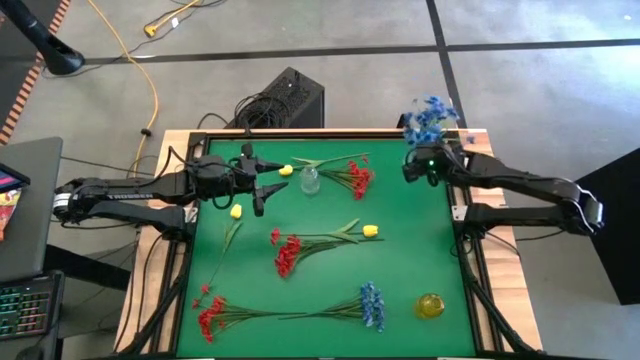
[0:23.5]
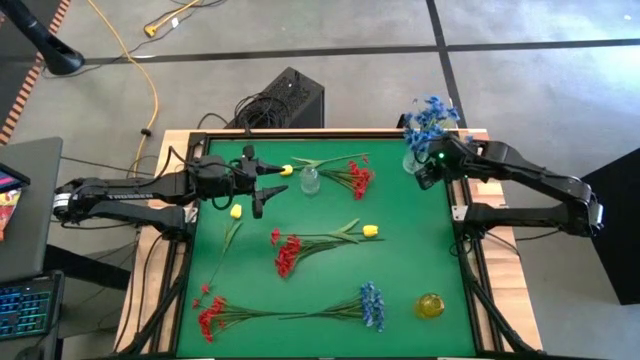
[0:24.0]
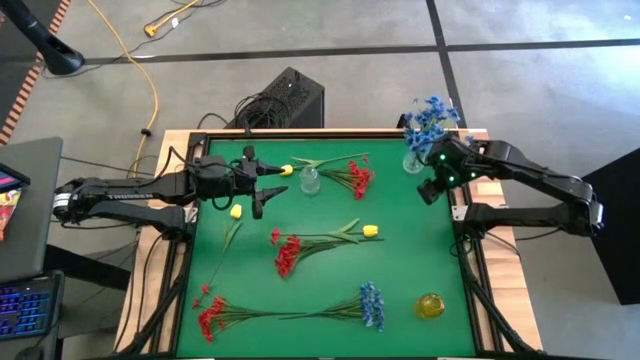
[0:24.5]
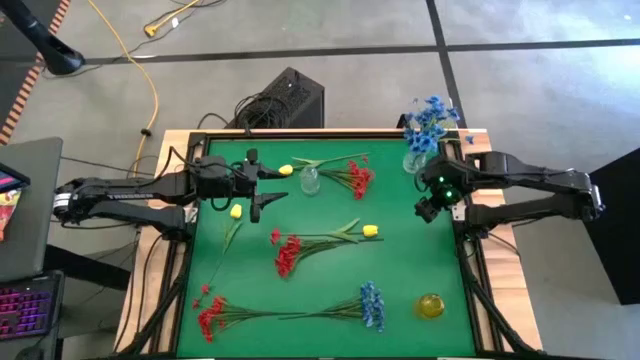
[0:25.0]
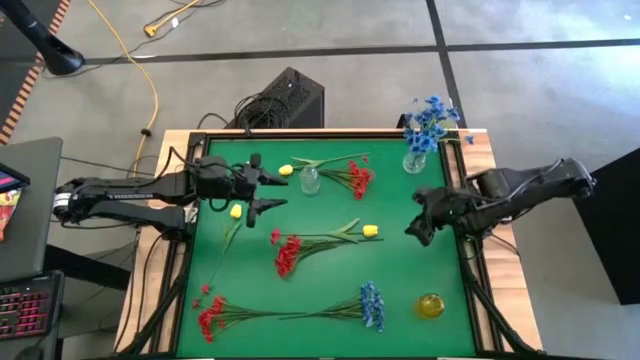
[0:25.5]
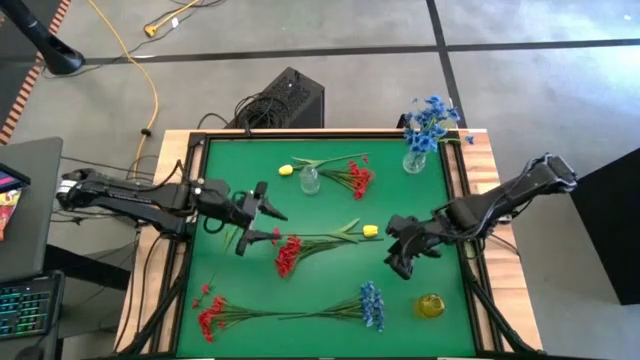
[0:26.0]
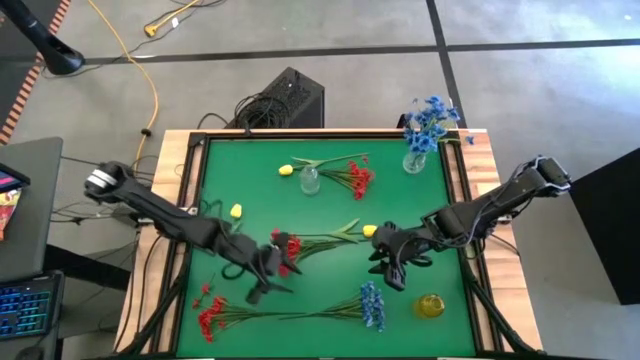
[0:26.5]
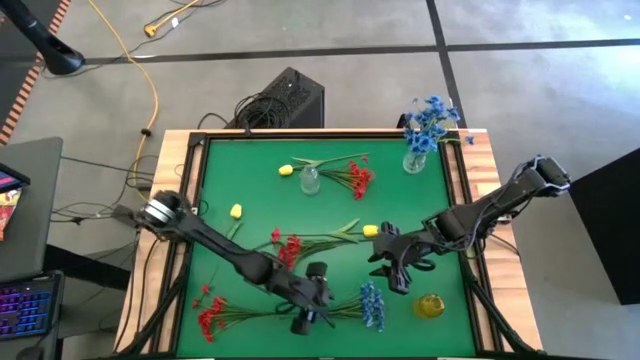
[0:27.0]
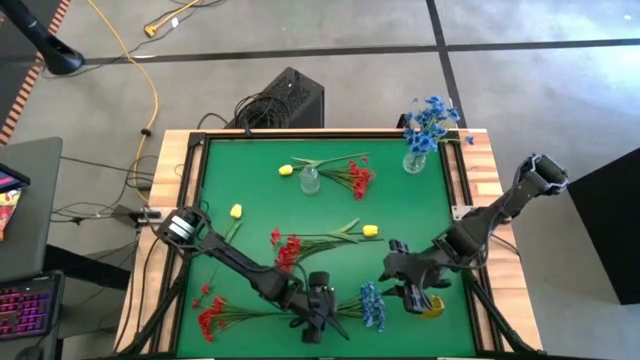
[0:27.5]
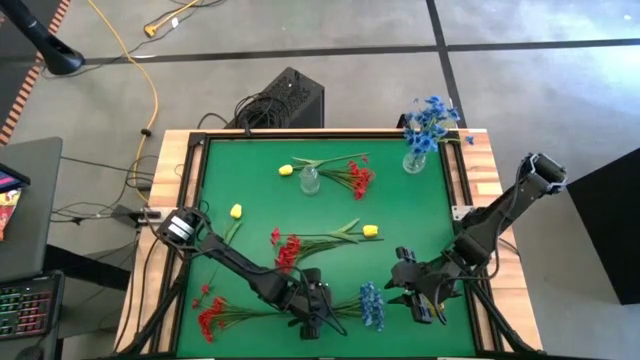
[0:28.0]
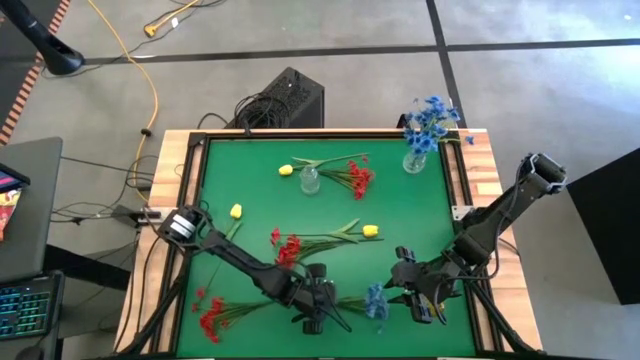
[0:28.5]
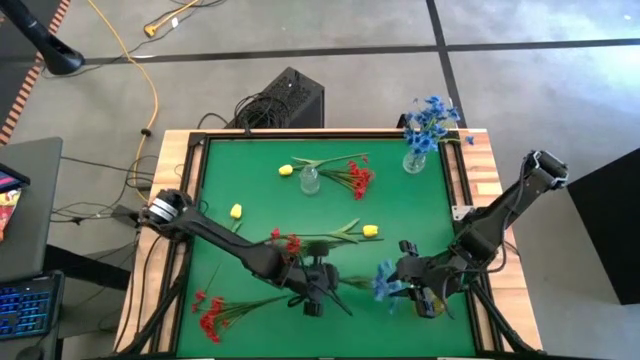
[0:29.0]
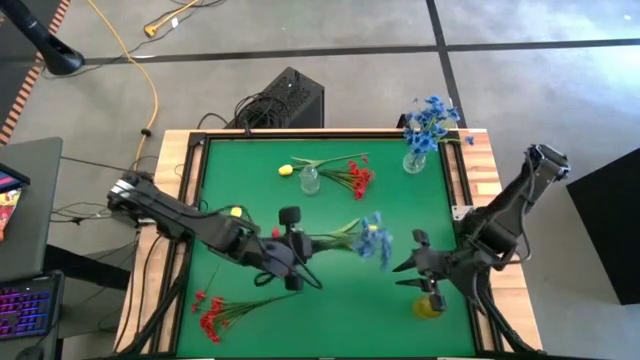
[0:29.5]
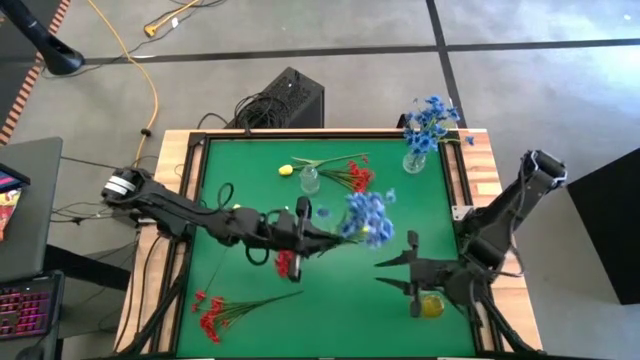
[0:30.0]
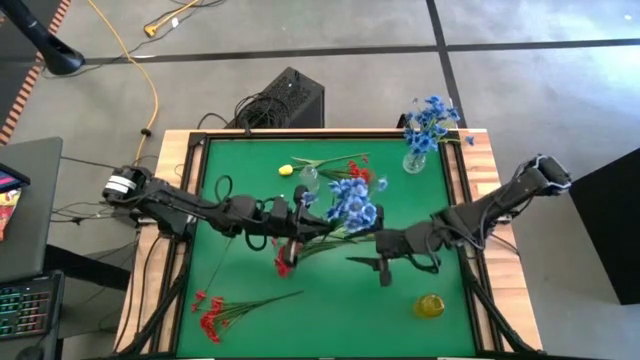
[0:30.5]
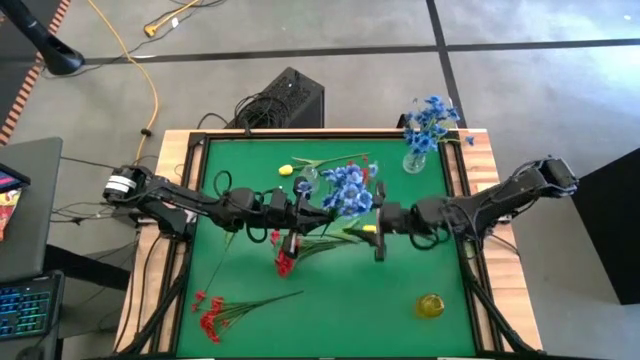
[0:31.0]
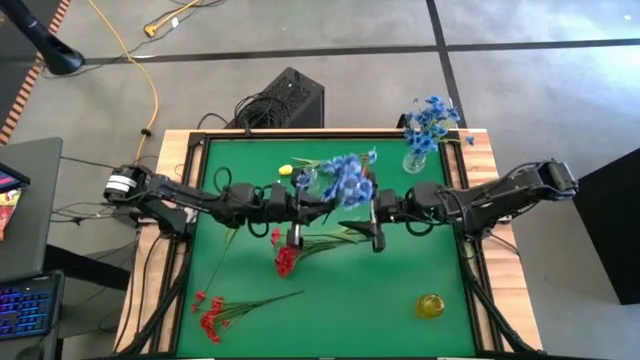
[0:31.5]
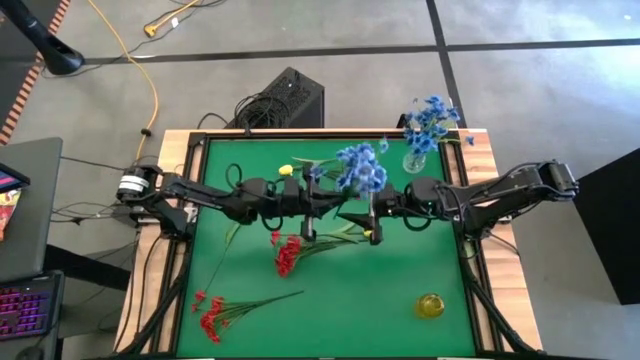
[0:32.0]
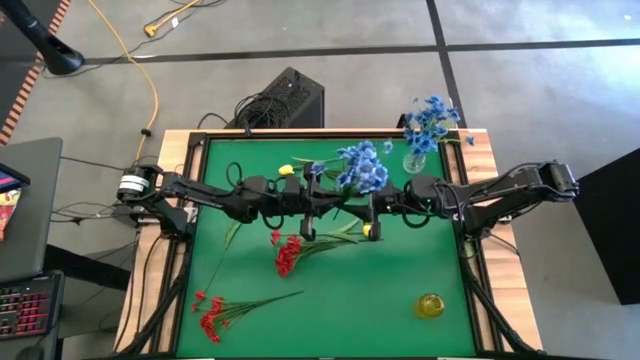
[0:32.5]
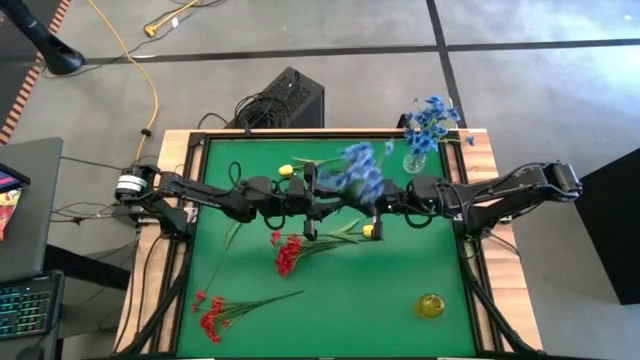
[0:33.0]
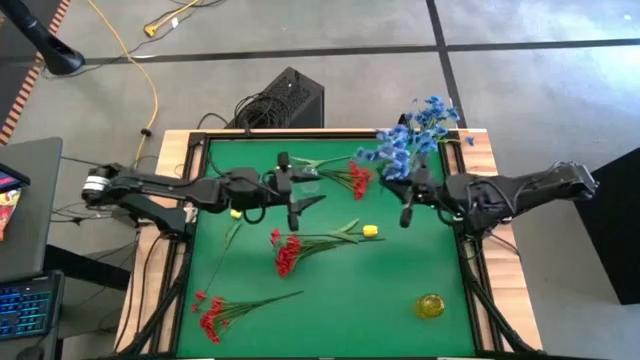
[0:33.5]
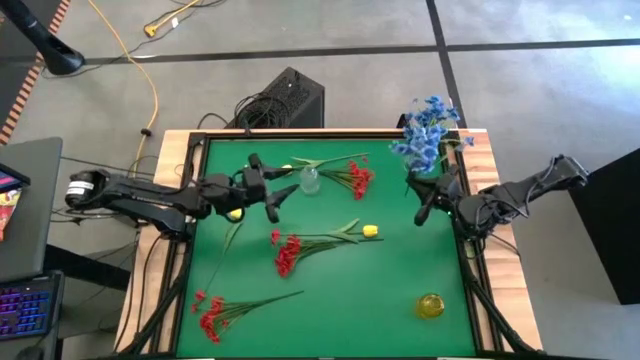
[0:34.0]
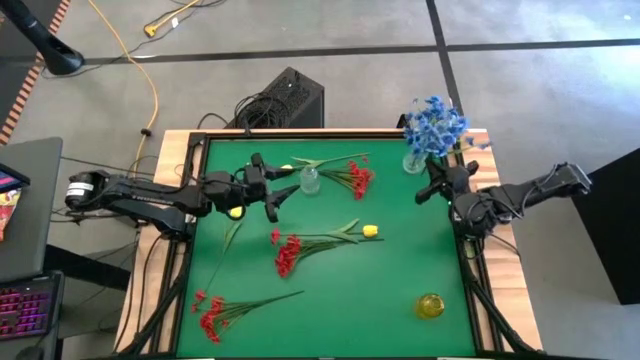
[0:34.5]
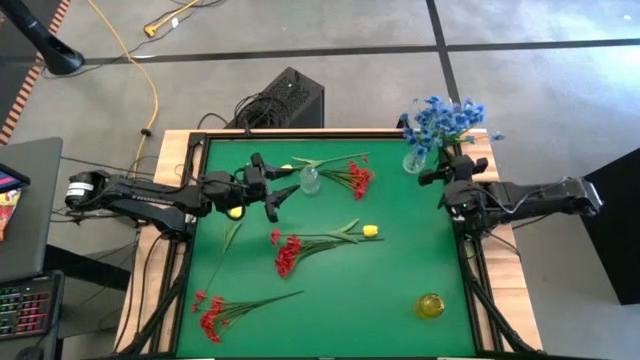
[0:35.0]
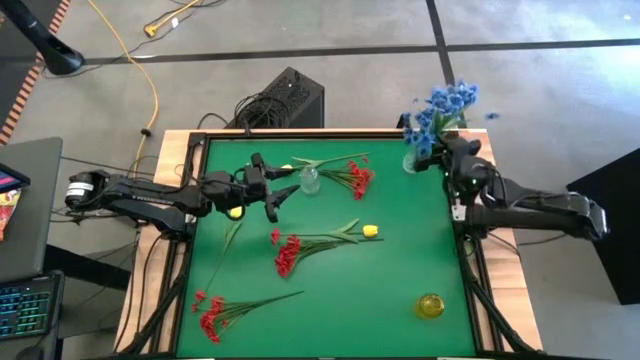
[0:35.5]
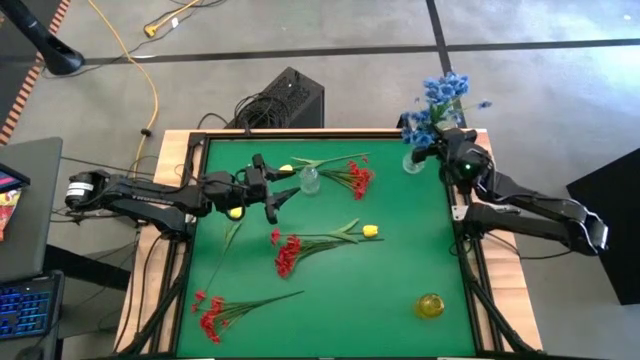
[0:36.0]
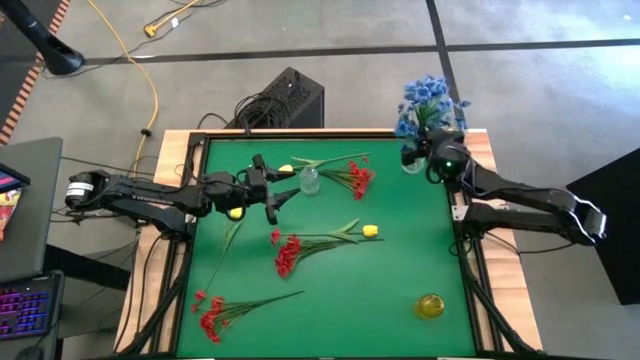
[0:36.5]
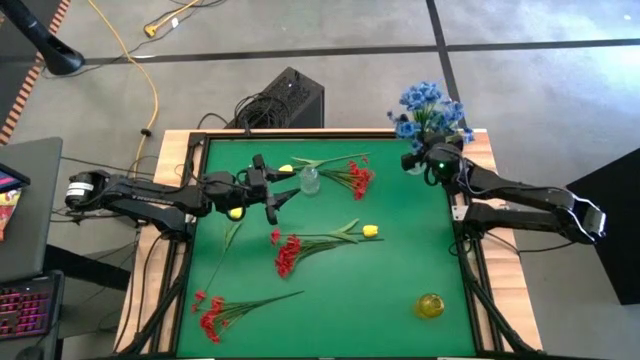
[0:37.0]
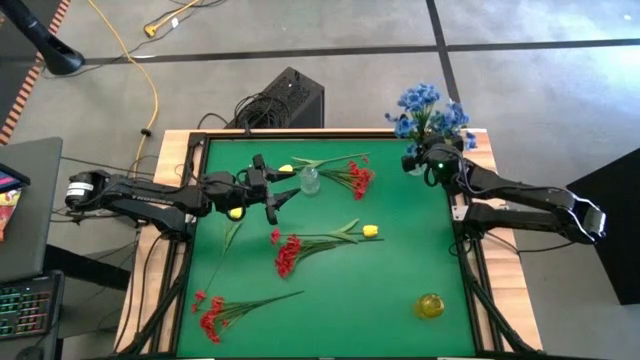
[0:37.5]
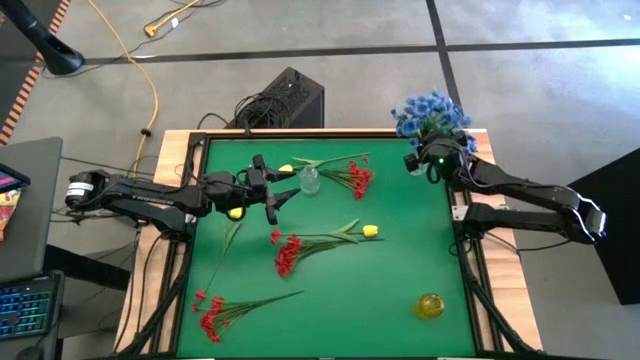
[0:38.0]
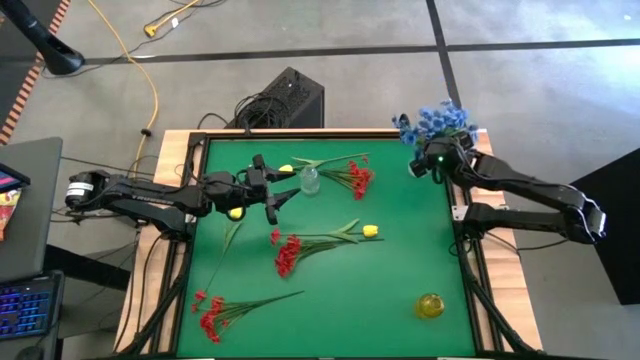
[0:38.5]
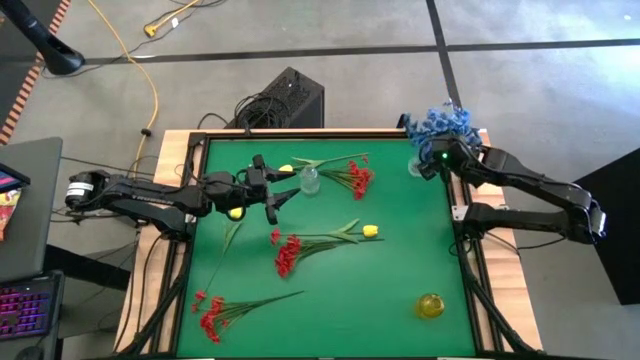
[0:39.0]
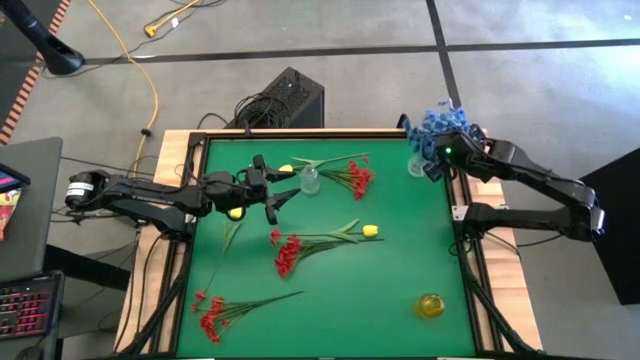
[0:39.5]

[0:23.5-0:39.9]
Task: Sort flowers into vase by color
Put the blue flowers into the right transparent vase

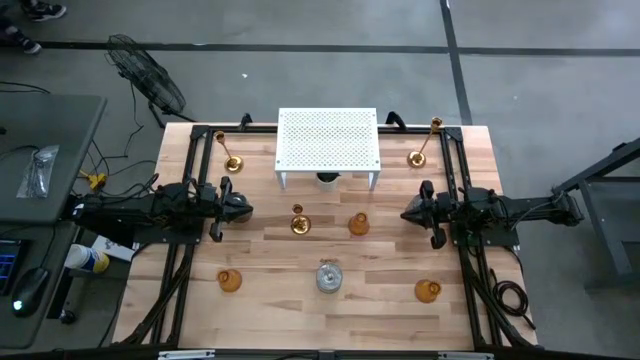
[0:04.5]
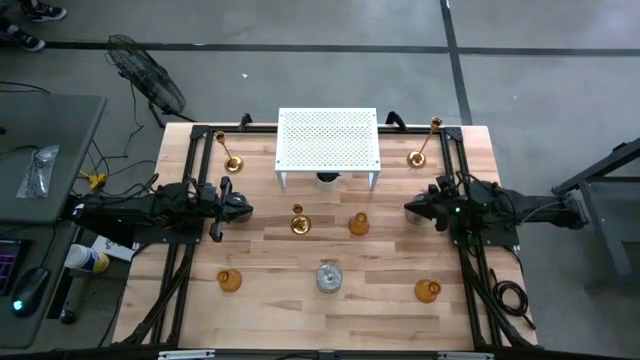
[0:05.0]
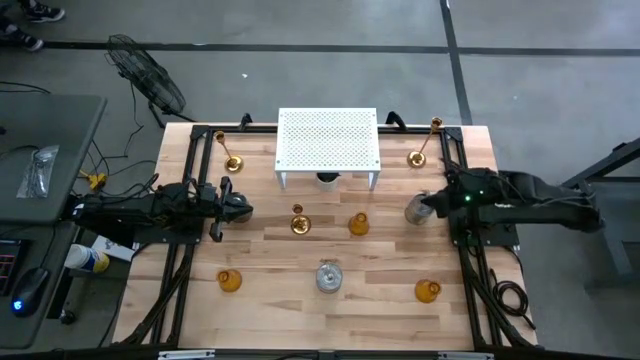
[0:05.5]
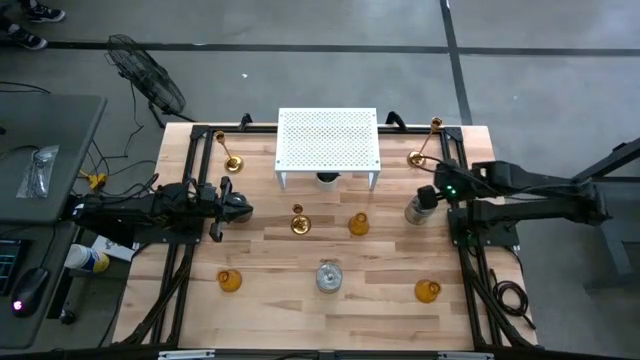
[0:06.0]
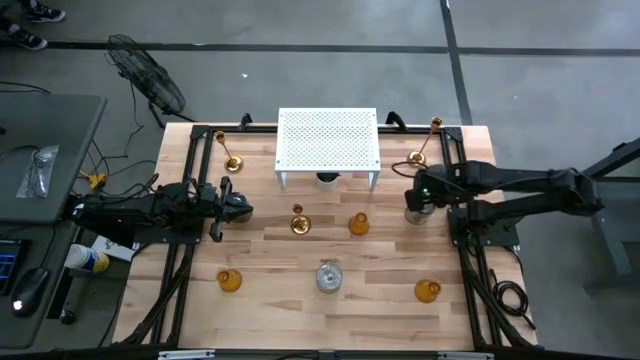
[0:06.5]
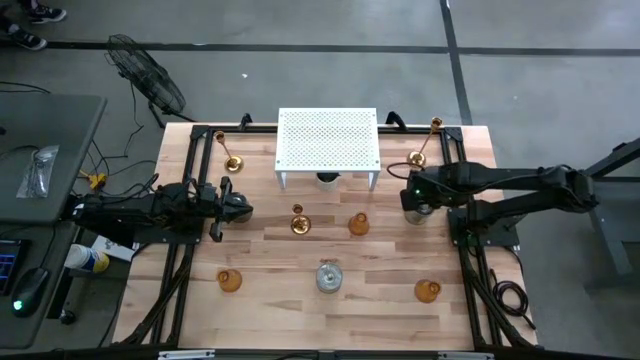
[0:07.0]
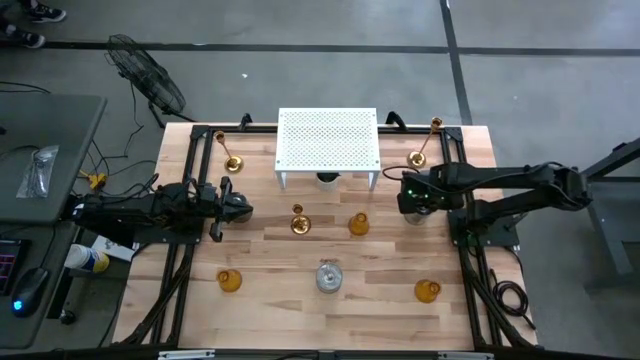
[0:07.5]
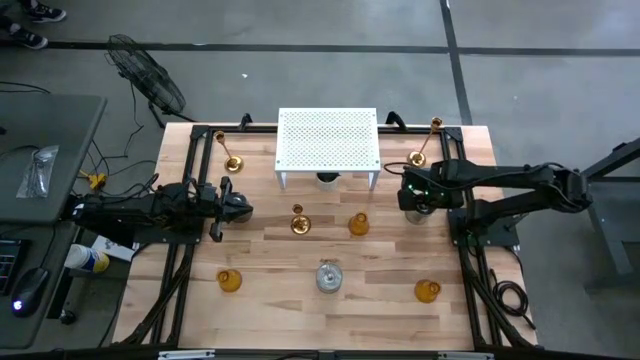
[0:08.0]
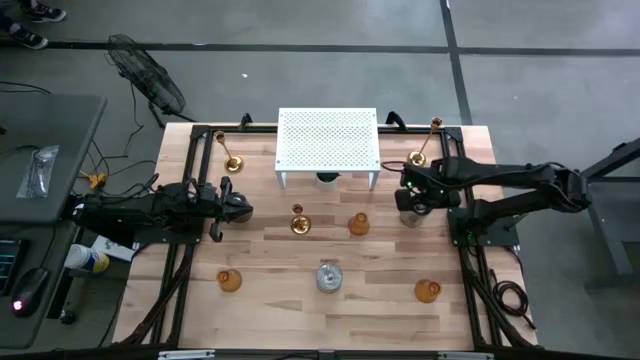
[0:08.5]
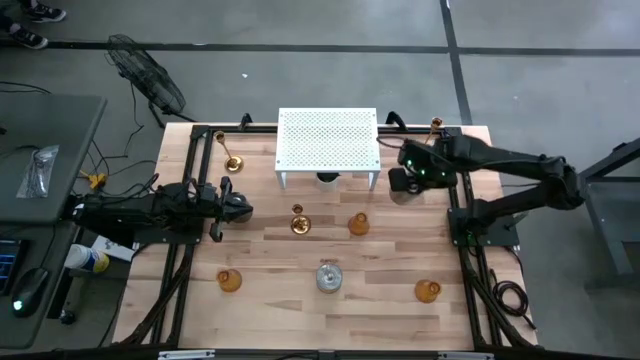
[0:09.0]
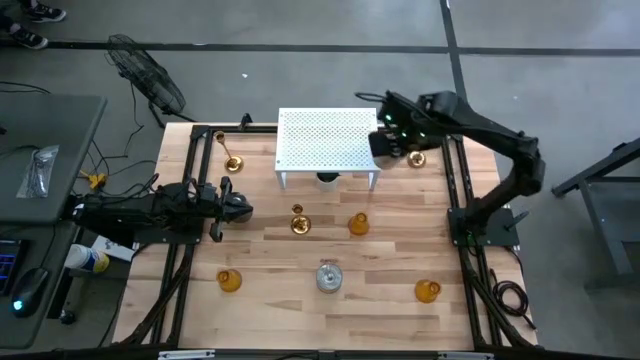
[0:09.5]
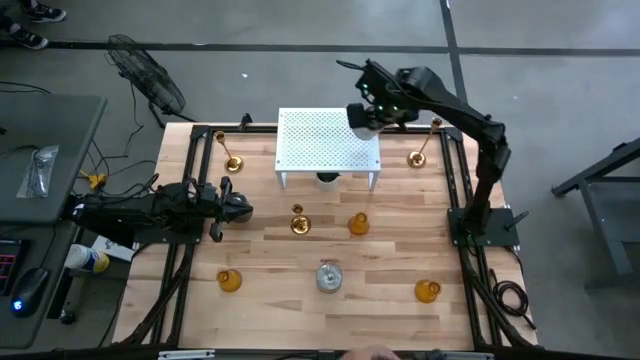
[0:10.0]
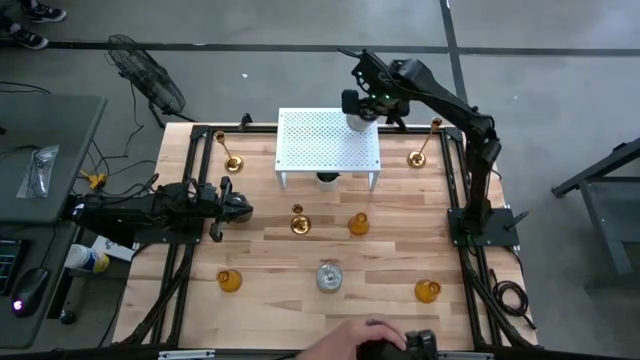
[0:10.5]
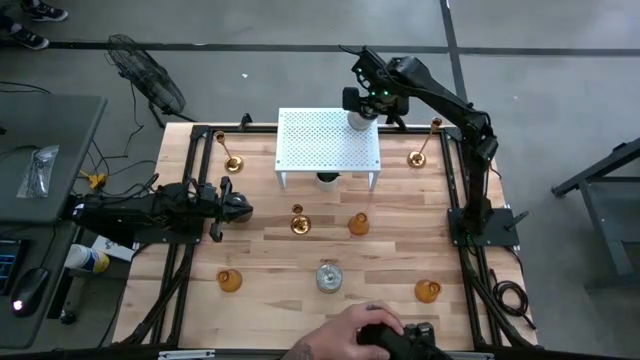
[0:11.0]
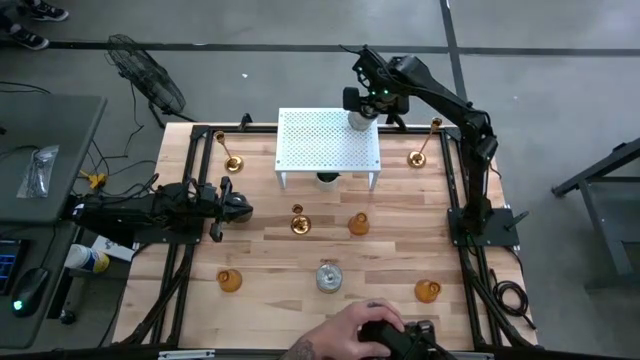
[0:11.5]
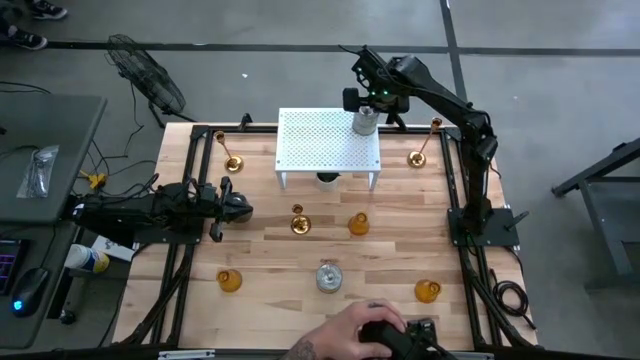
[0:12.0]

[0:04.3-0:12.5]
Task: Pick & Place candle stick holders
Put the middle right orange scented candle on the shelf
